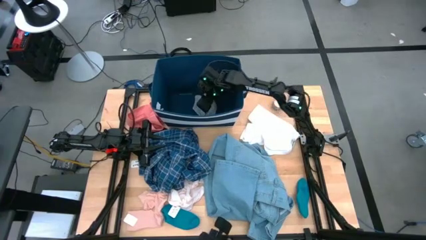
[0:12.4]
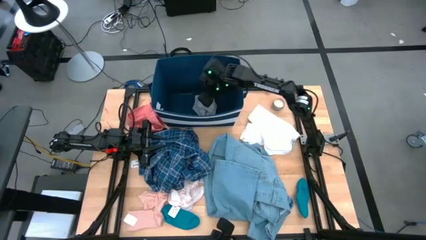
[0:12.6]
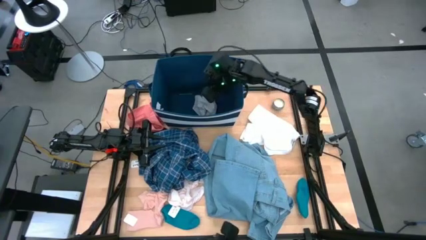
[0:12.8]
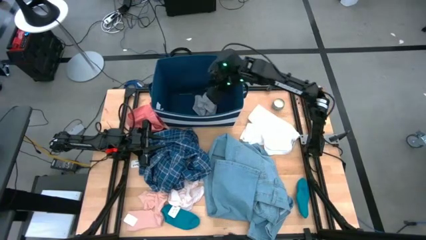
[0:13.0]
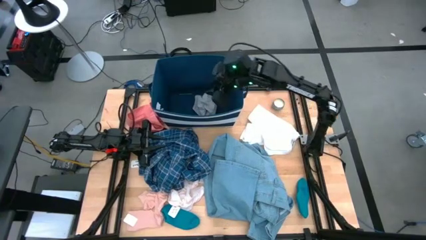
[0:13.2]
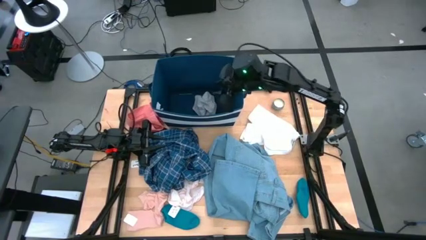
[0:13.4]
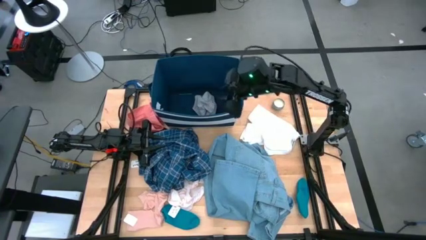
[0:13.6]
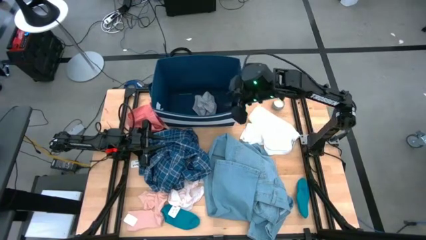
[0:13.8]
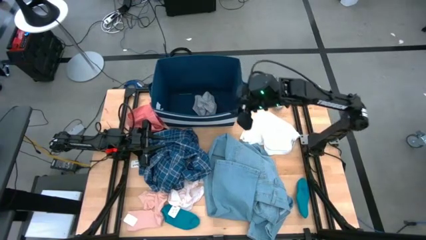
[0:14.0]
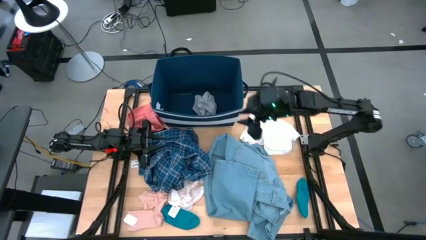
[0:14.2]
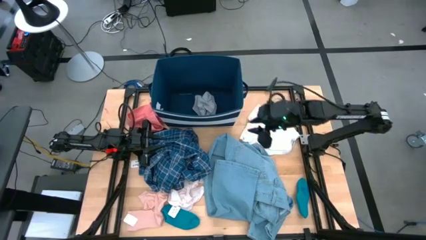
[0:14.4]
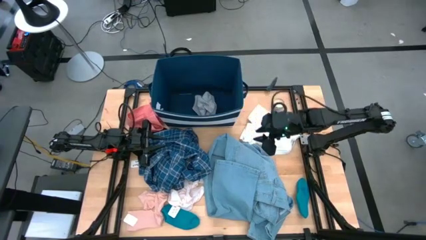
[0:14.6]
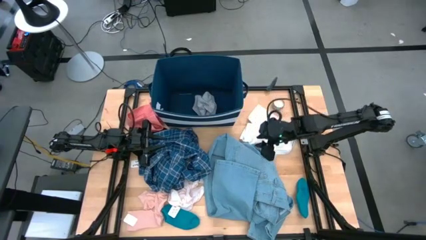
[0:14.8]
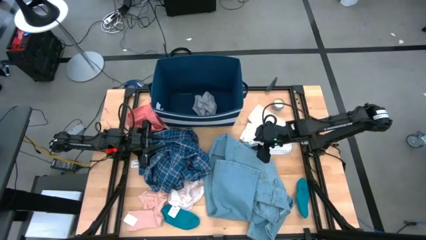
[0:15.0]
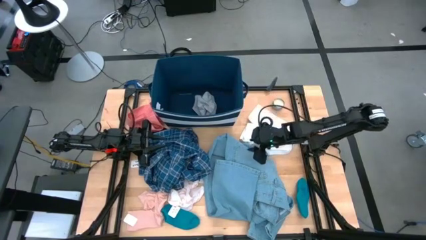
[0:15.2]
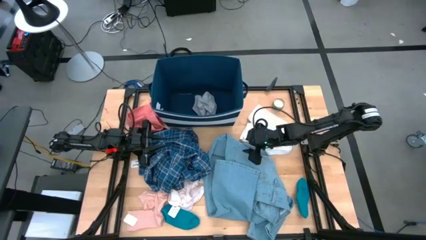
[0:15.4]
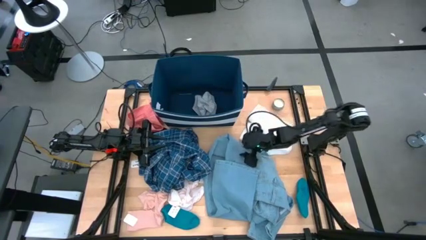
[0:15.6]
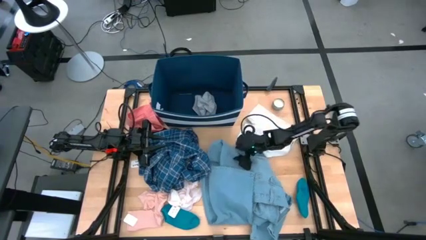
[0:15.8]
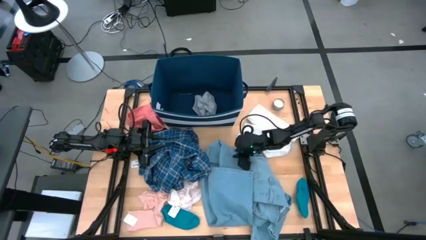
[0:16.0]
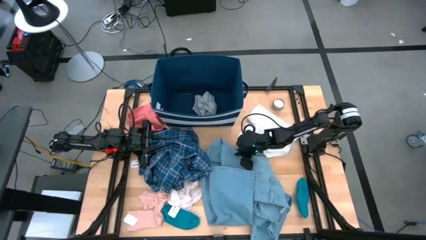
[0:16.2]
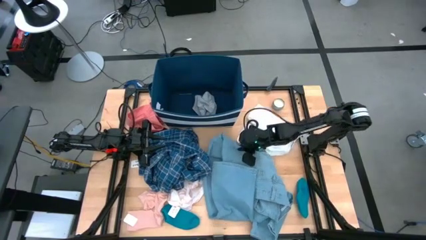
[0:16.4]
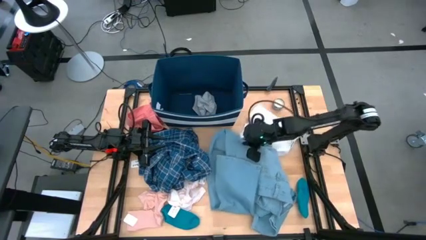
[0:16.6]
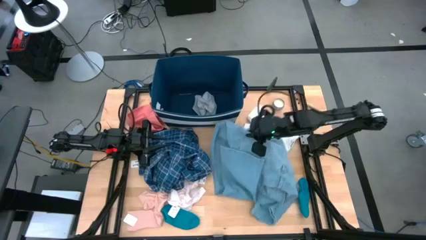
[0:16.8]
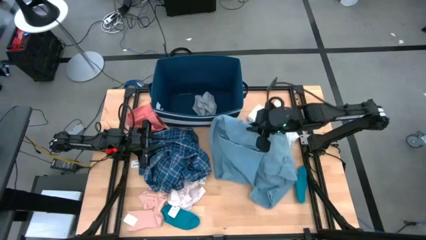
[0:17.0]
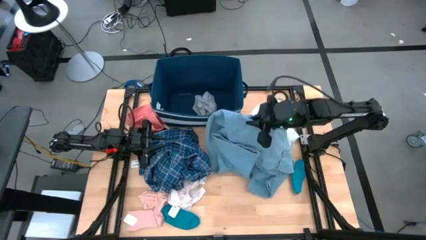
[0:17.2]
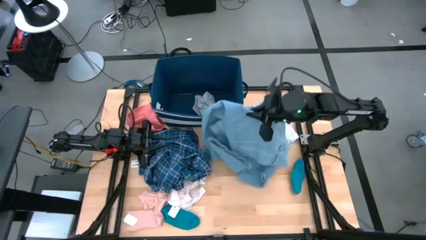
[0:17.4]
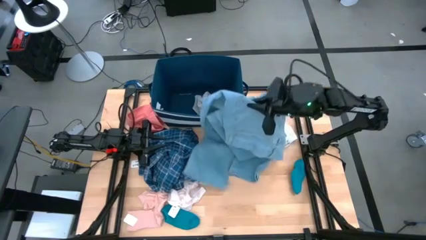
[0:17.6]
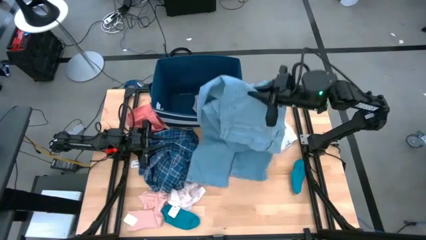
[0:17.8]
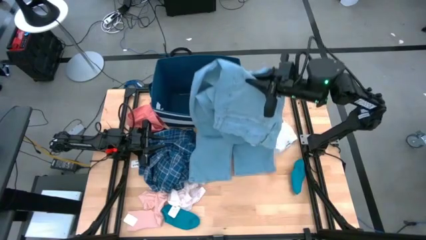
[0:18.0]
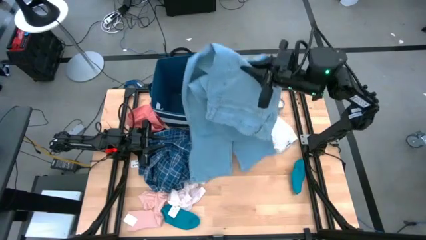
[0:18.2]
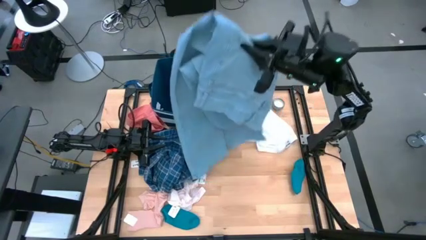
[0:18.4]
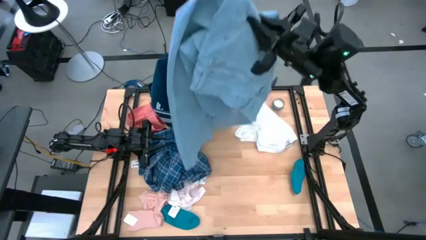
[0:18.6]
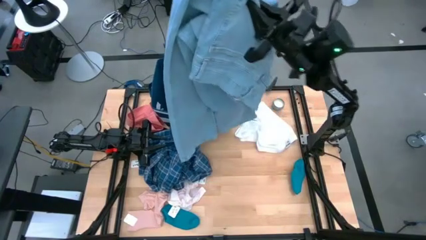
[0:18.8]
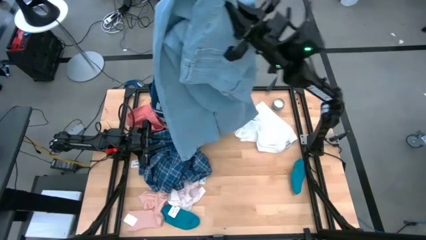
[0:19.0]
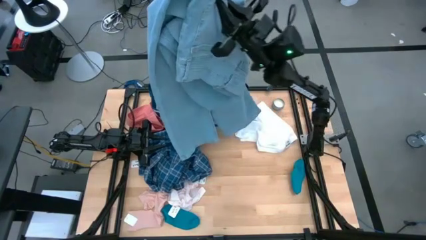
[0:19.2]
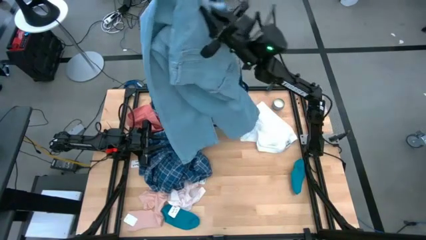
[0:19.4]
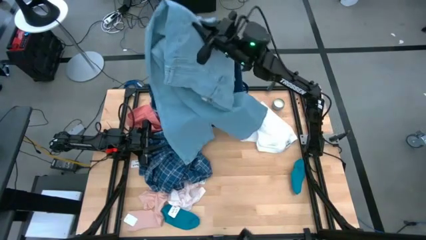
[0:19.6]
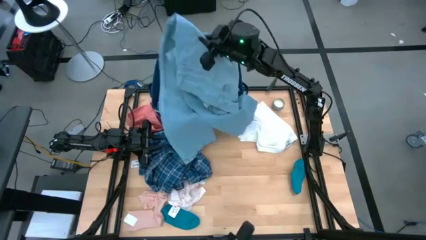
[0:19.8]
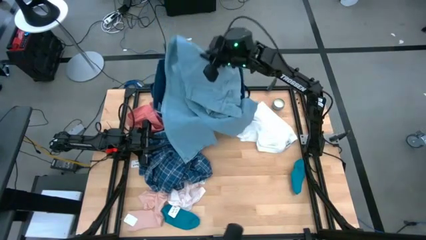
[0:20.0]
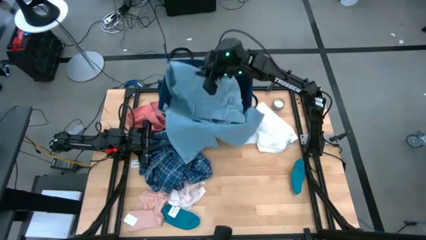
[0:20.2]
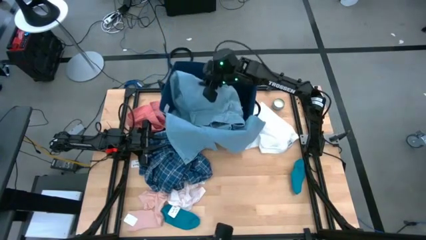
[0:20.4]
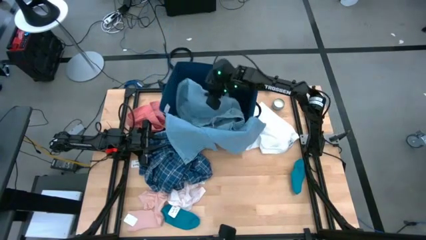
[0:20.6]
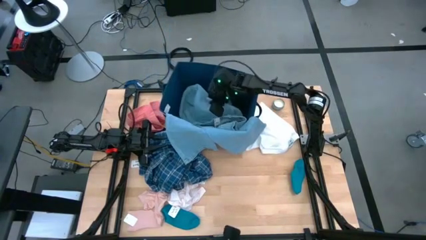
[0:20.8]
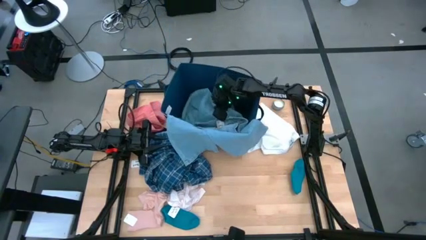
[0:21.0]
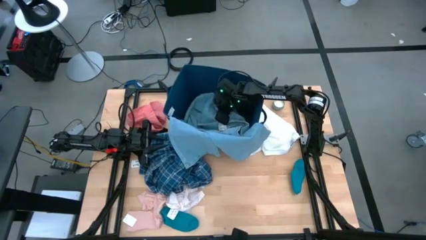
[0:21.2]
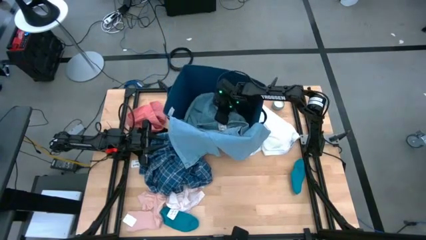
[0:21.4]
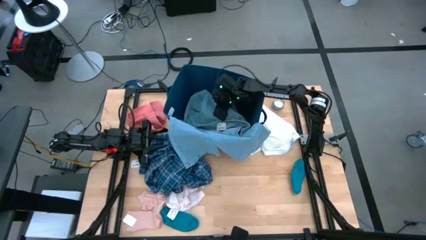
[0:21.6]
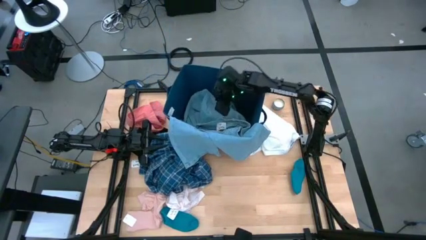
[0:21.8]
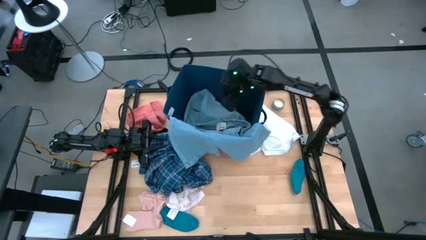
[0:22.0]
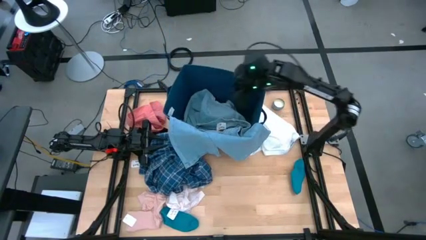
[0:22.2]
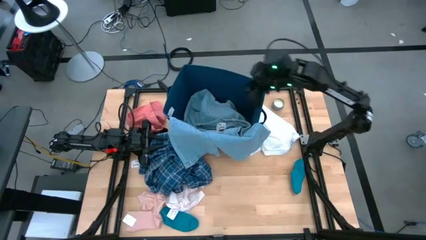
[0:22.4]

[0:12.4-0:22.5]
Task: Sort clothes
Put the blue jeans into the blue laundry bin

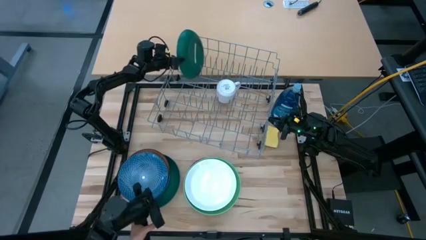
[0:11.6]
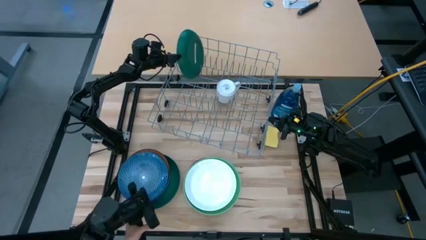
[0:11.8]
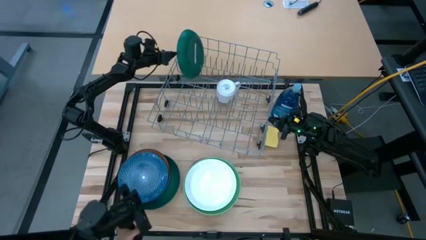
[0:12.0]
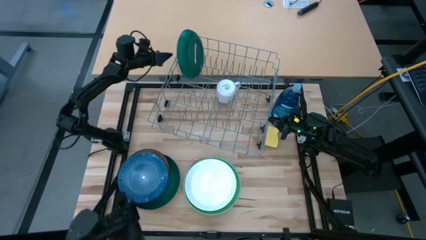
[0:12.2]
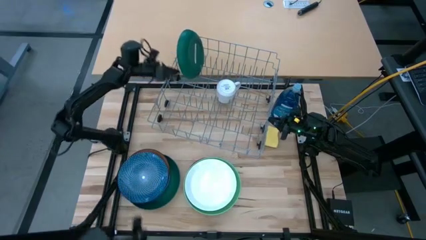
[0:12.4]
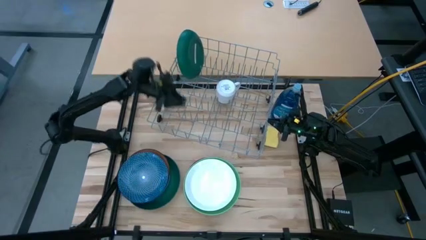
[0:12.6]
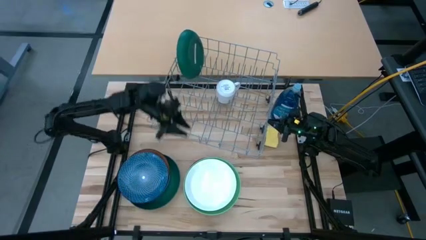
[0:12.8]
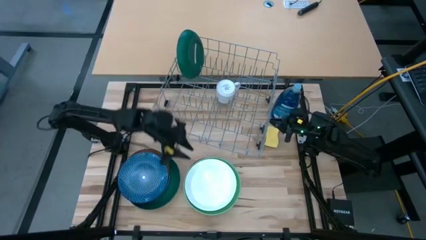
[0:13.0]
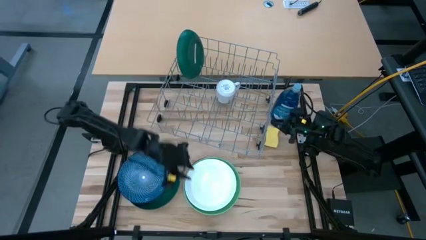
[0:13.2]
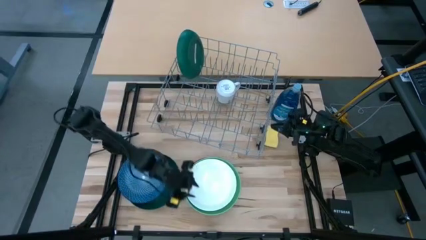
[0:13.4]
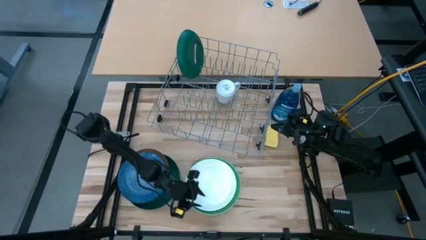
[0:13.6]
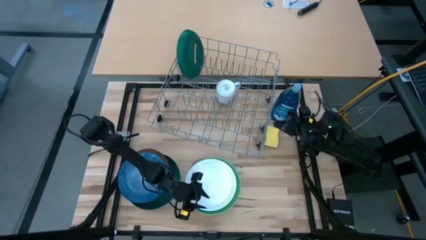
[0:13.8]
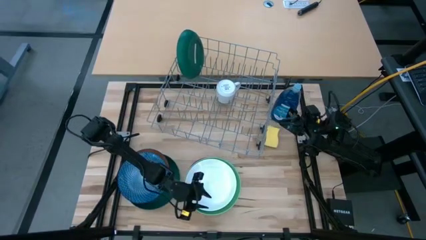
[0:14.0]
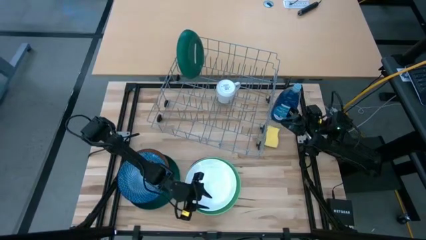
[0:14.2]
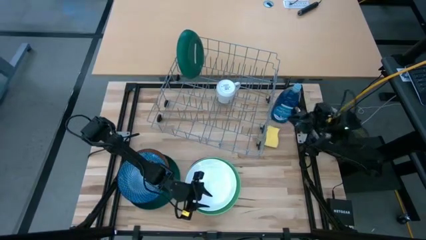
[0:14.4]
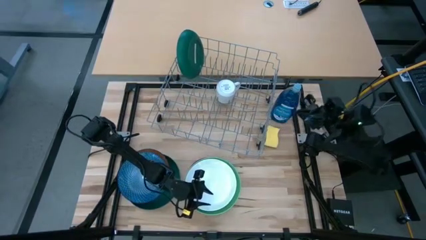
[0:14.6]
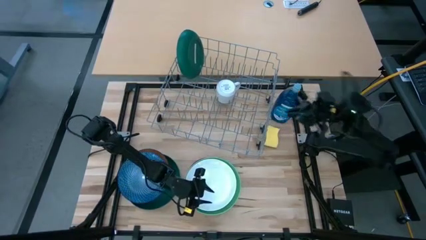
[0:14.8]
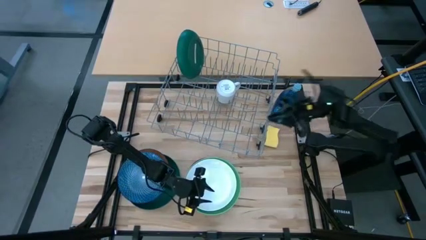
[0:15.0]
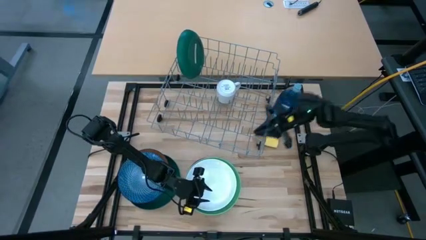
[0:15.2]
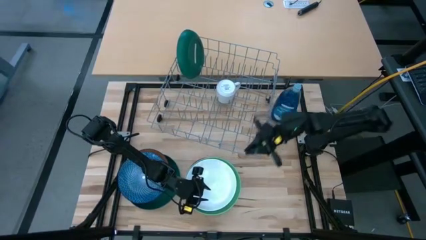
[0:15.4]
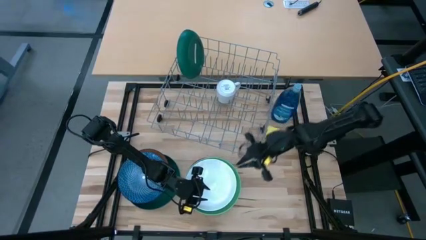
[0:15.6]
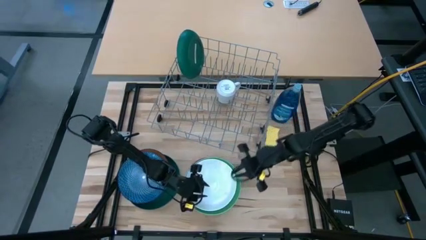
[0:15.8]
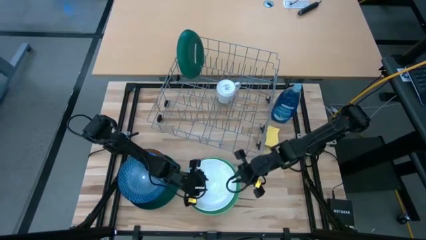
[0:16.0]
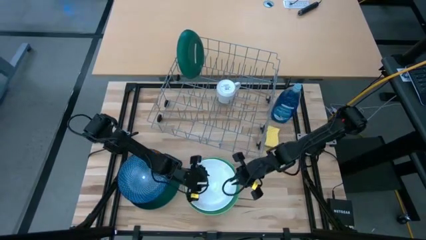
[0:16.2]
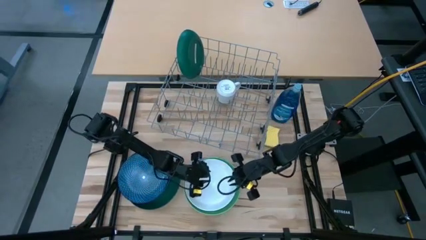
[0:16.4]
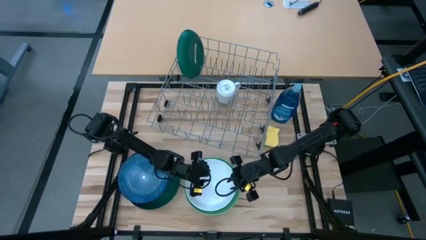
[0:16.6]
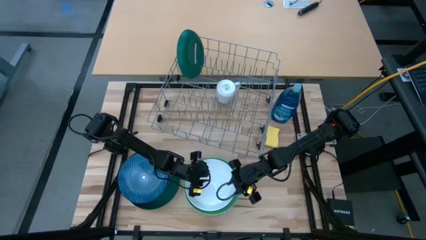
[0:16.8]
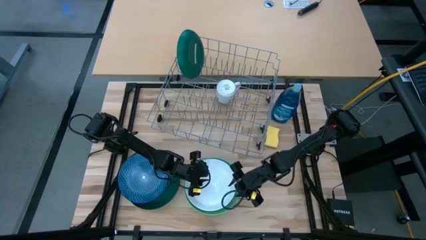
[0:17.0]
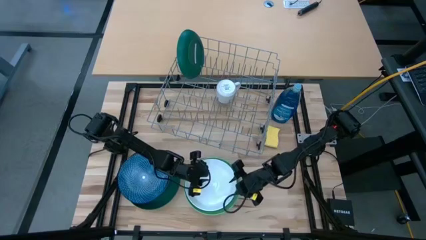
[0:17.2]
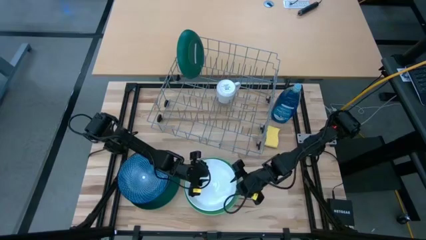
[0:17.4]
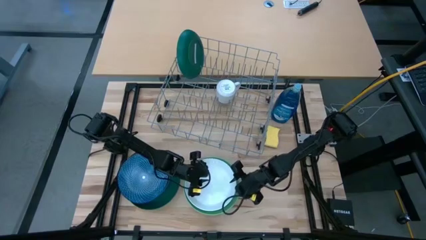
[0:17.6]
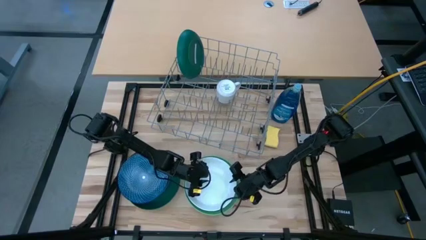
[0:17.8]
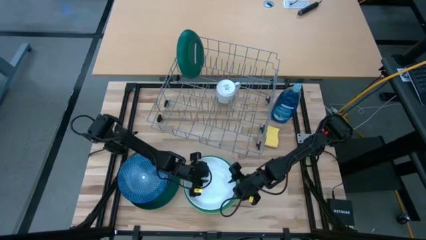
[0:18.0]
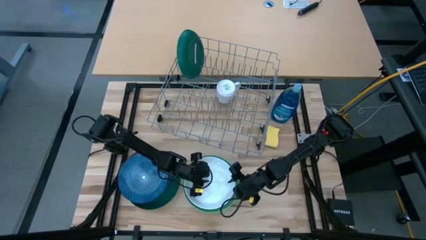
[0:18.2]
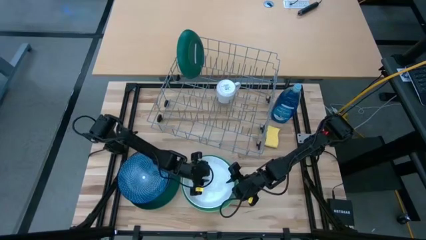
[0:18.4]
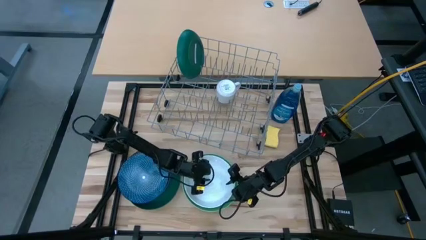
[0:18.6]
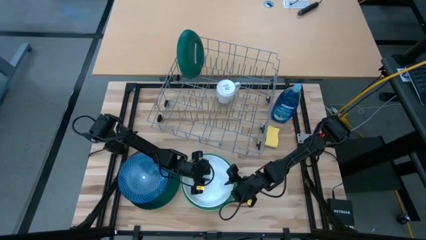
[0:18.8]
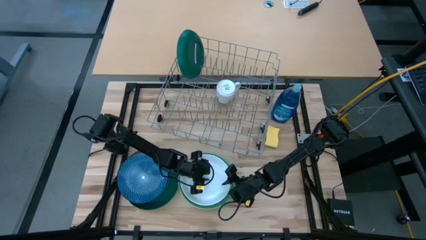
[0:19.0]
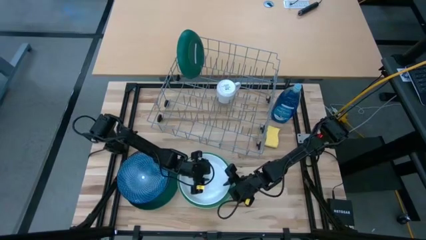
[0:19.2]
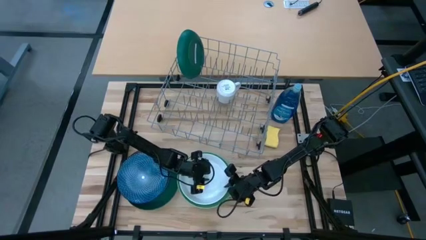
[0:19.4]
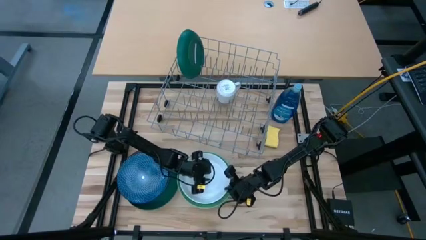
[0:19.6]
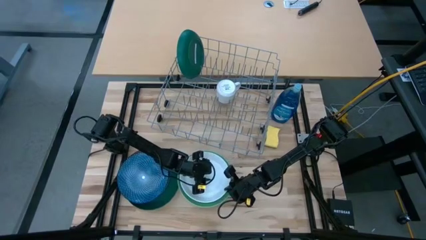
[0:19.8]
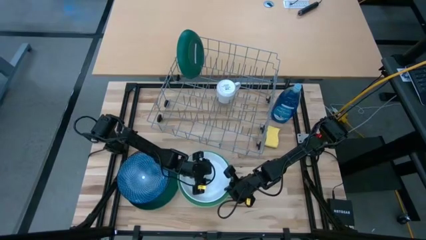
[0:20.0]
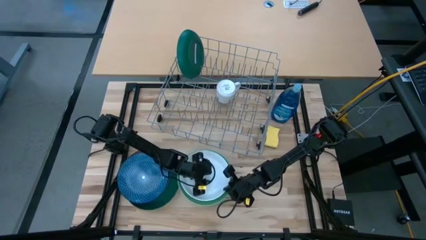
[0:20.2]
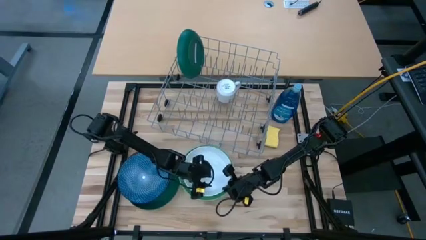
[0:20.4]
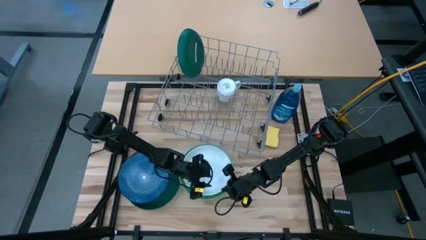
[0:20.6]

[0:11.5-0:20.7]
Task: Sort dishes
Put the white plate in the dish rack
